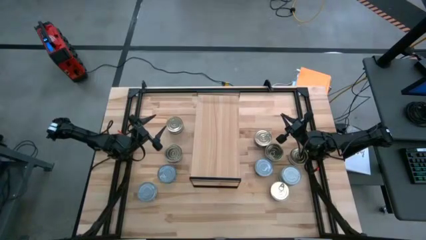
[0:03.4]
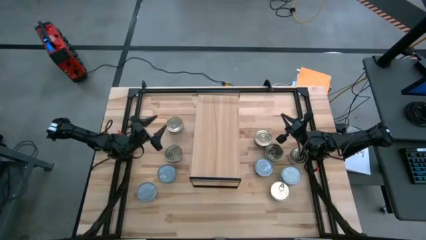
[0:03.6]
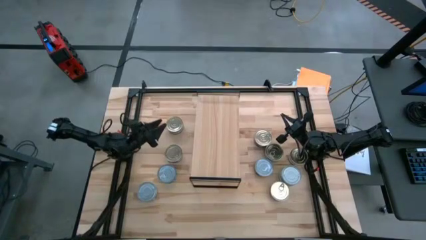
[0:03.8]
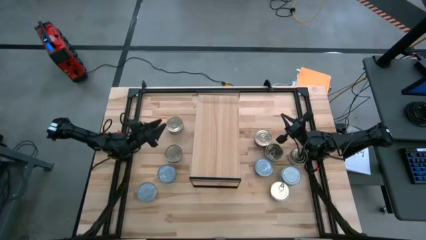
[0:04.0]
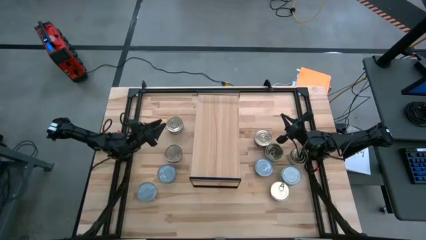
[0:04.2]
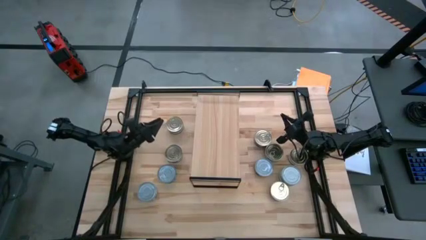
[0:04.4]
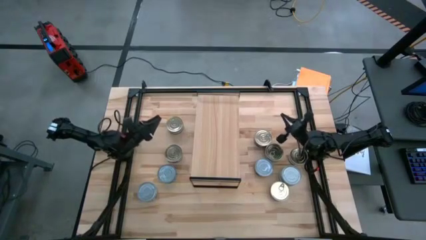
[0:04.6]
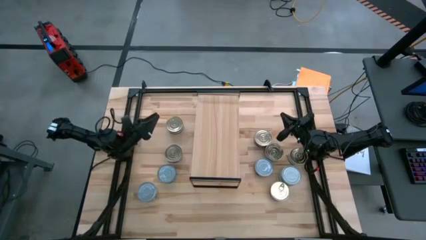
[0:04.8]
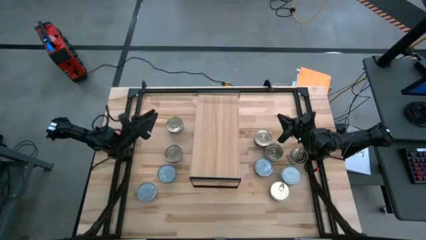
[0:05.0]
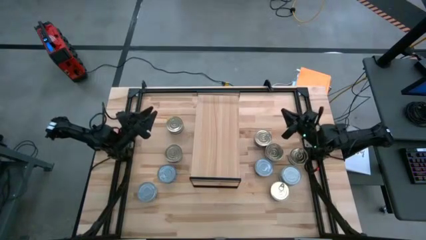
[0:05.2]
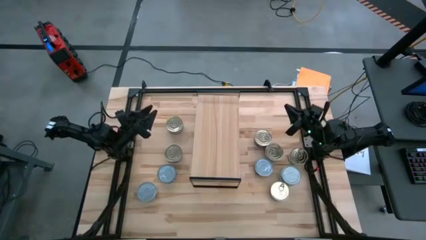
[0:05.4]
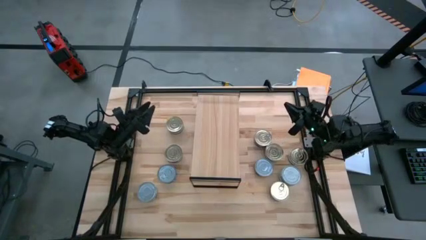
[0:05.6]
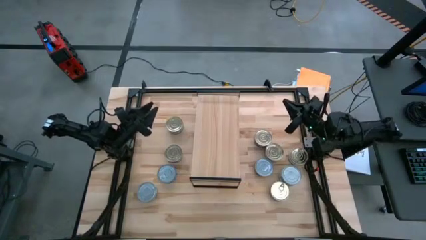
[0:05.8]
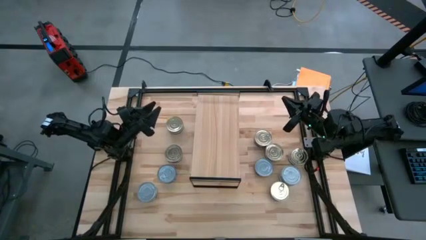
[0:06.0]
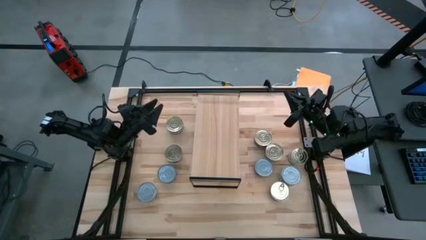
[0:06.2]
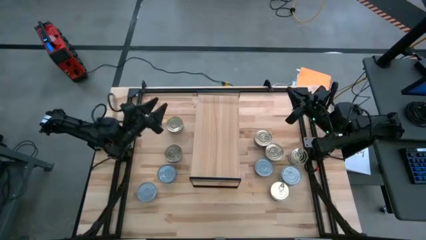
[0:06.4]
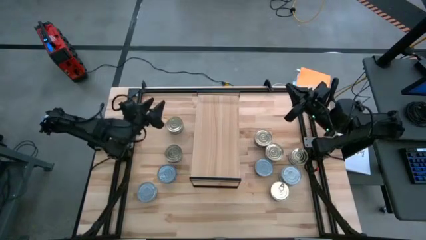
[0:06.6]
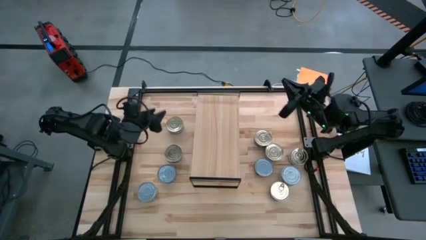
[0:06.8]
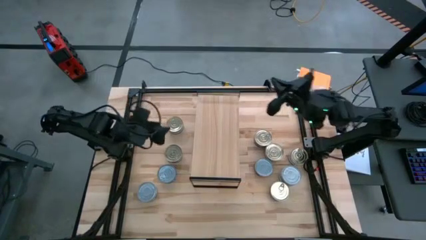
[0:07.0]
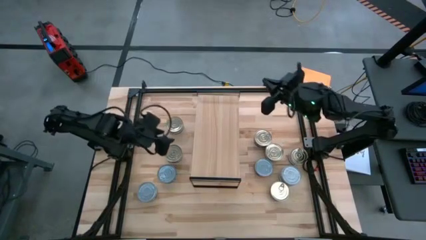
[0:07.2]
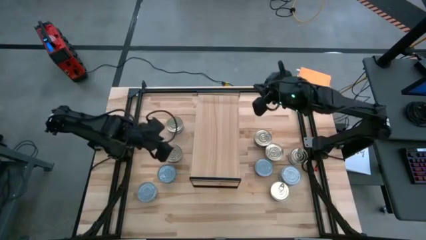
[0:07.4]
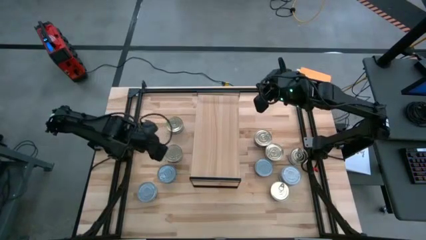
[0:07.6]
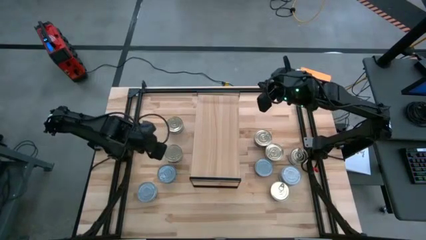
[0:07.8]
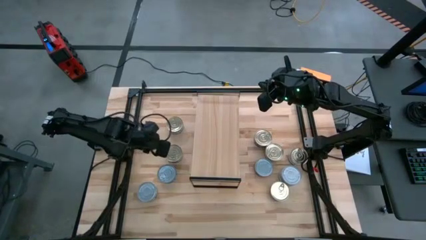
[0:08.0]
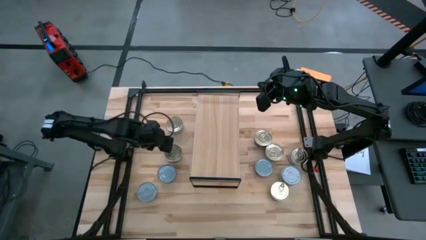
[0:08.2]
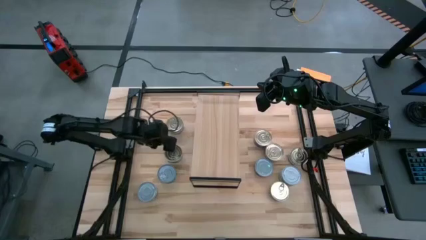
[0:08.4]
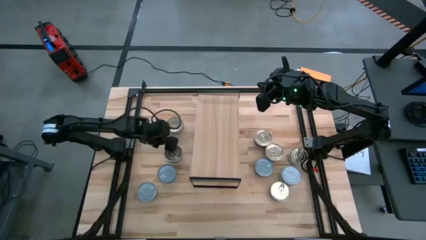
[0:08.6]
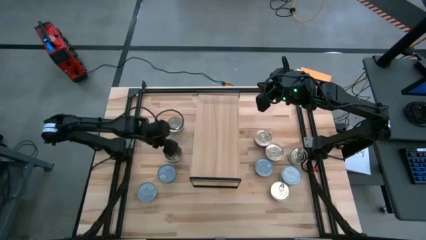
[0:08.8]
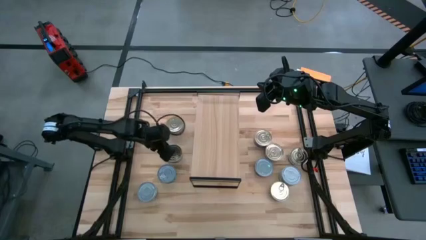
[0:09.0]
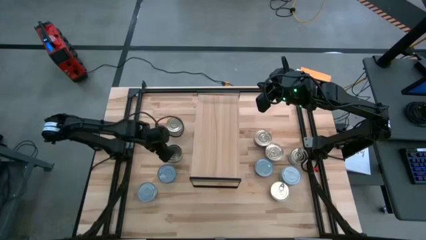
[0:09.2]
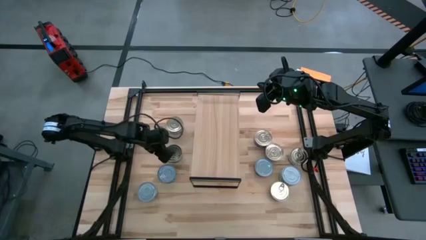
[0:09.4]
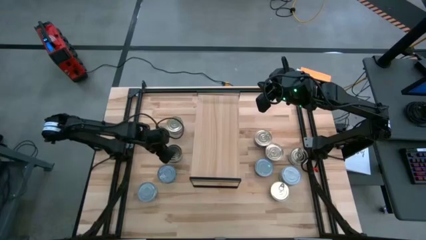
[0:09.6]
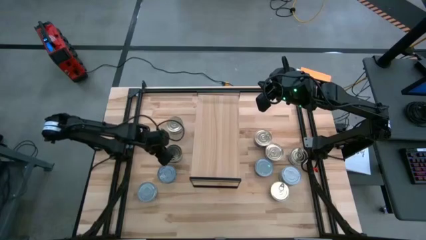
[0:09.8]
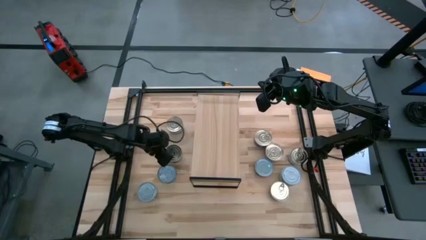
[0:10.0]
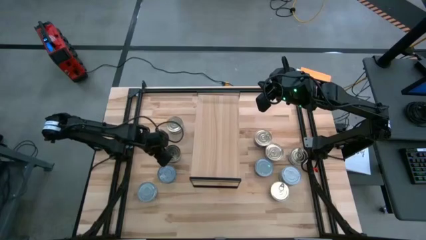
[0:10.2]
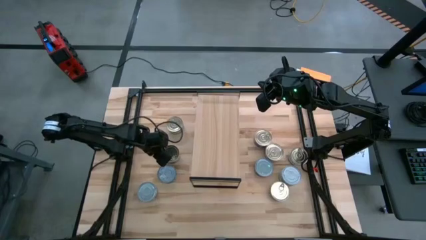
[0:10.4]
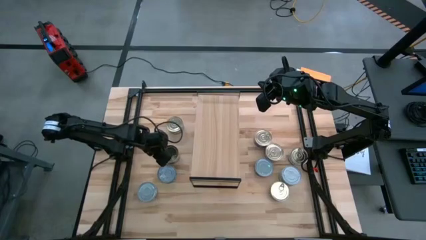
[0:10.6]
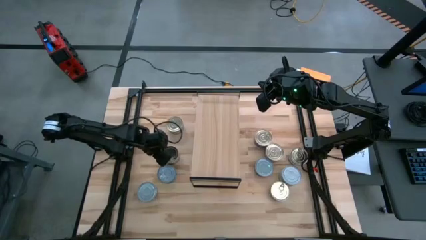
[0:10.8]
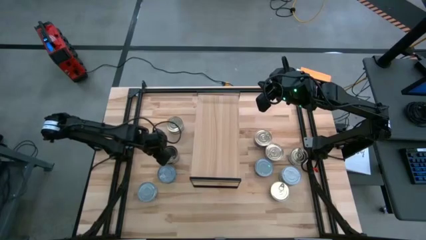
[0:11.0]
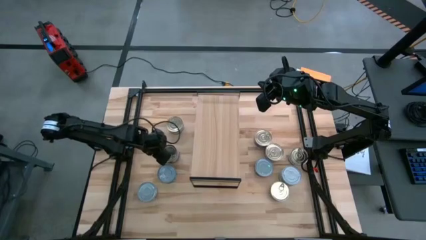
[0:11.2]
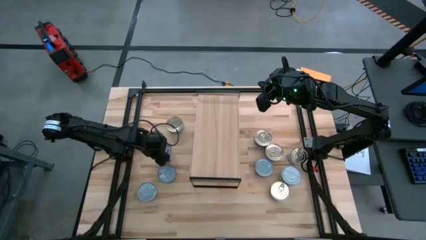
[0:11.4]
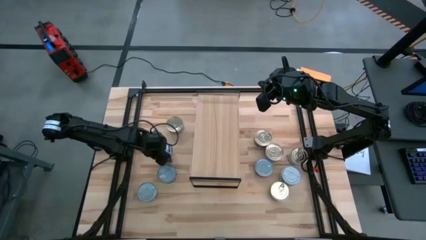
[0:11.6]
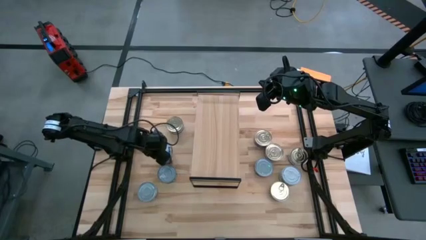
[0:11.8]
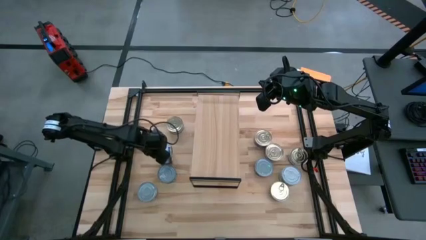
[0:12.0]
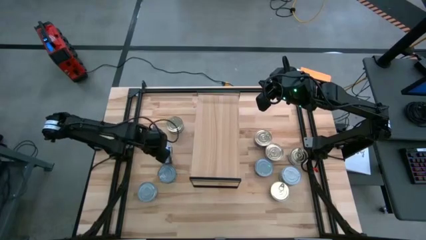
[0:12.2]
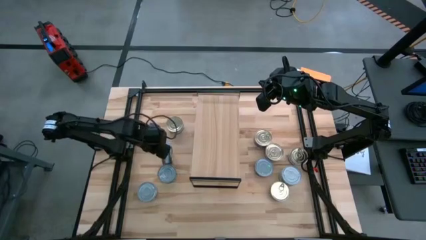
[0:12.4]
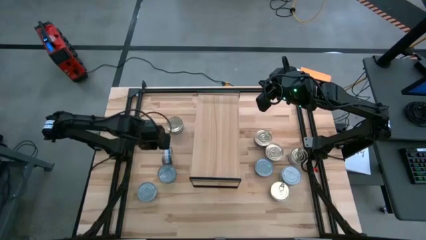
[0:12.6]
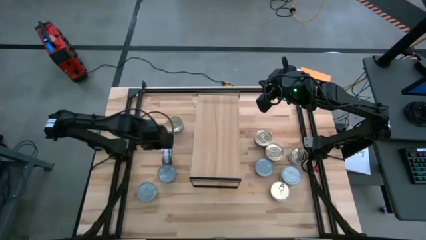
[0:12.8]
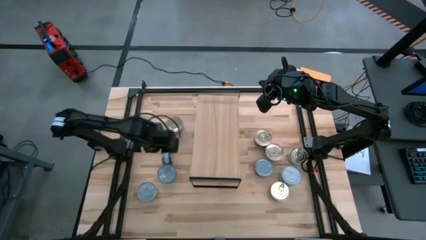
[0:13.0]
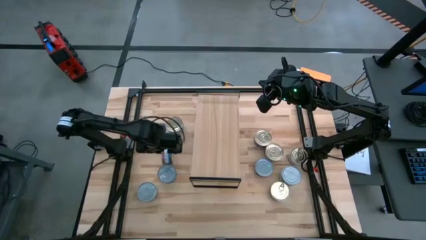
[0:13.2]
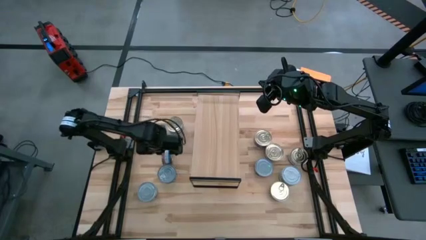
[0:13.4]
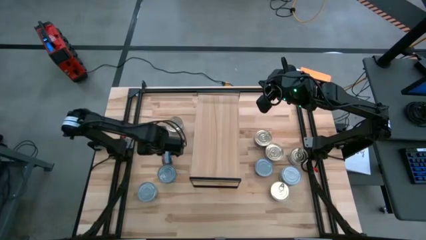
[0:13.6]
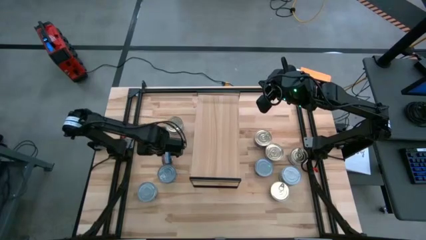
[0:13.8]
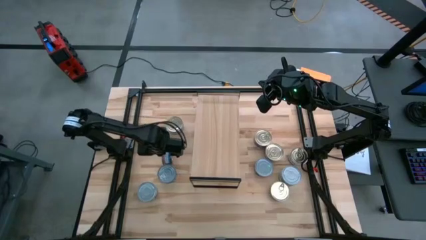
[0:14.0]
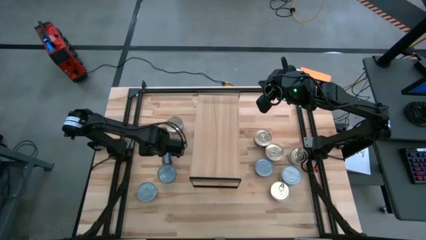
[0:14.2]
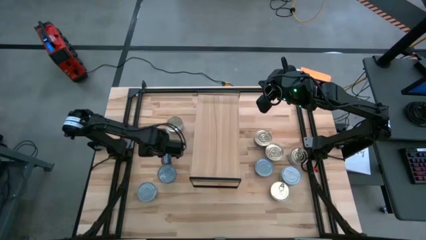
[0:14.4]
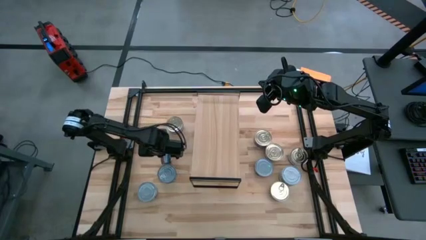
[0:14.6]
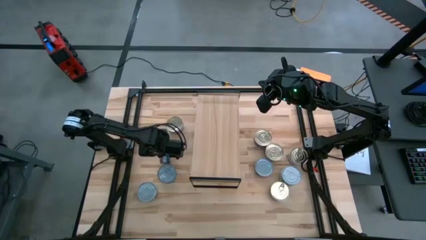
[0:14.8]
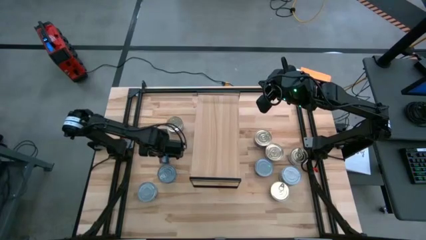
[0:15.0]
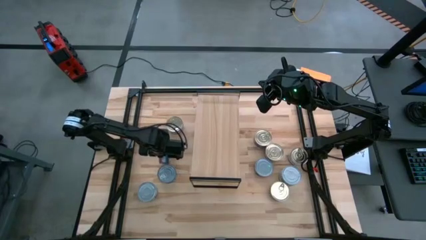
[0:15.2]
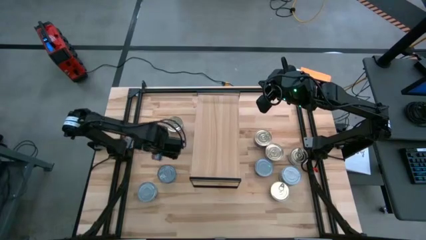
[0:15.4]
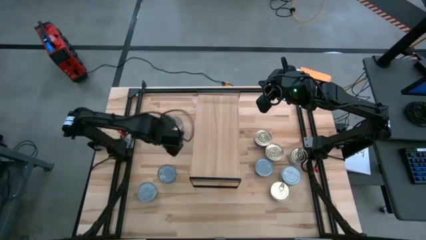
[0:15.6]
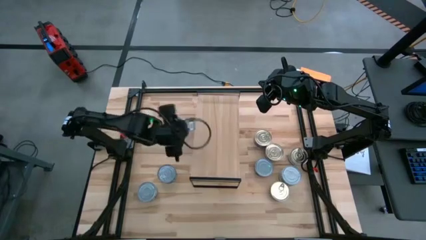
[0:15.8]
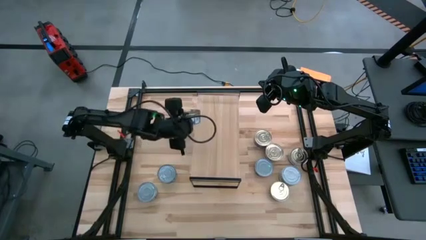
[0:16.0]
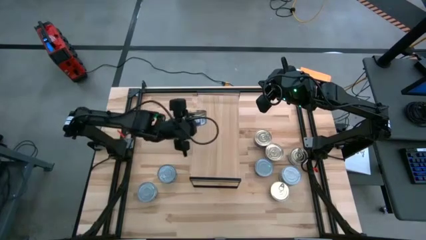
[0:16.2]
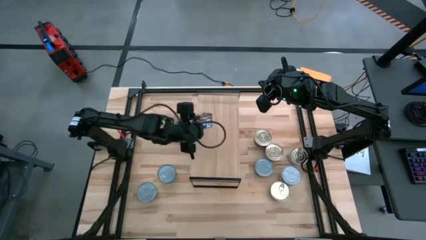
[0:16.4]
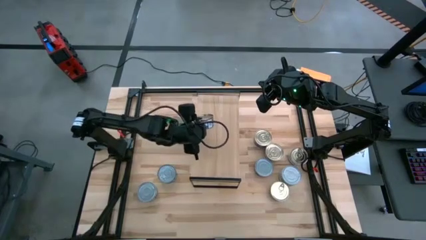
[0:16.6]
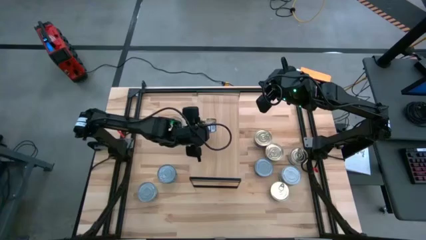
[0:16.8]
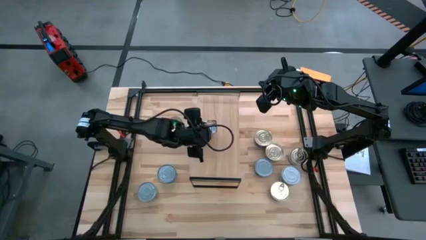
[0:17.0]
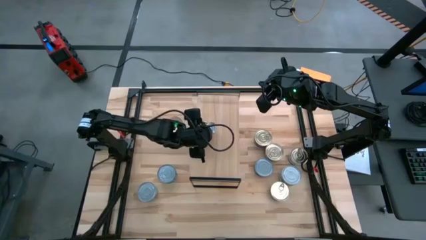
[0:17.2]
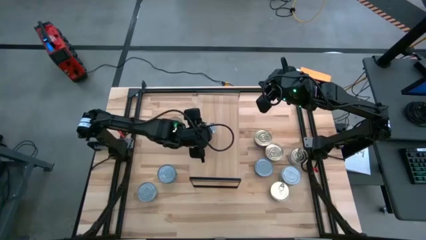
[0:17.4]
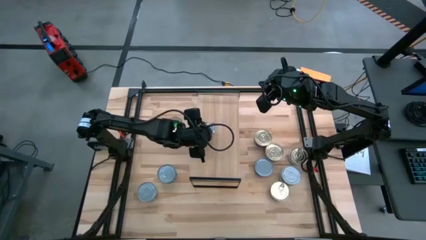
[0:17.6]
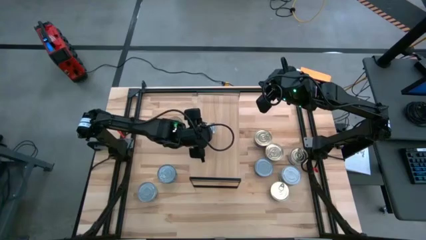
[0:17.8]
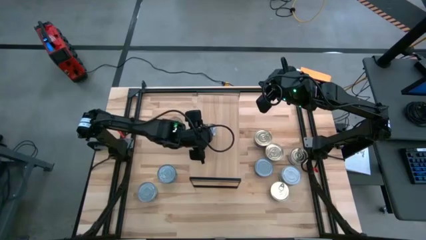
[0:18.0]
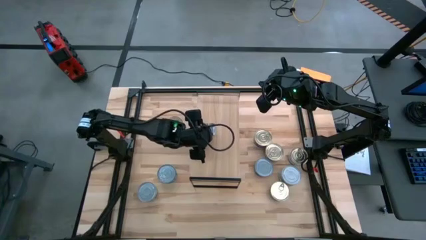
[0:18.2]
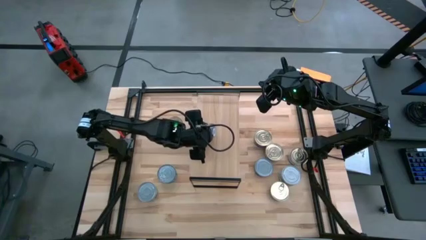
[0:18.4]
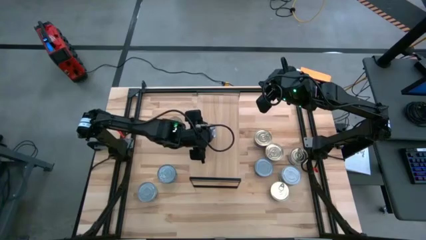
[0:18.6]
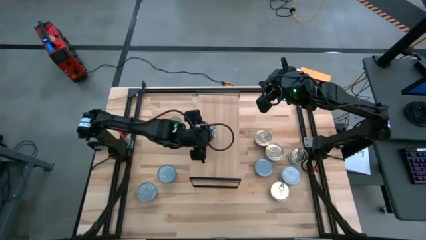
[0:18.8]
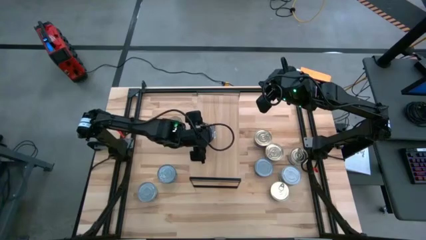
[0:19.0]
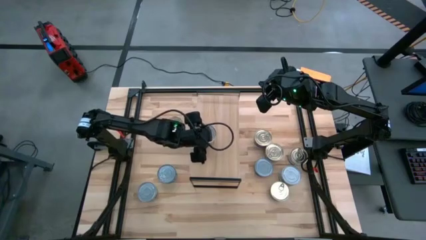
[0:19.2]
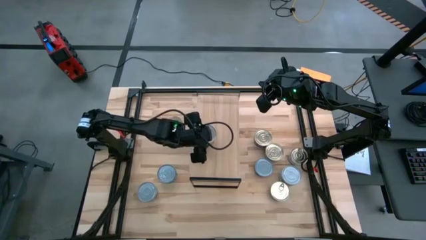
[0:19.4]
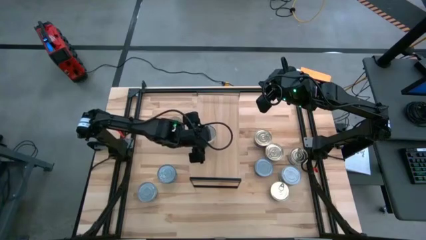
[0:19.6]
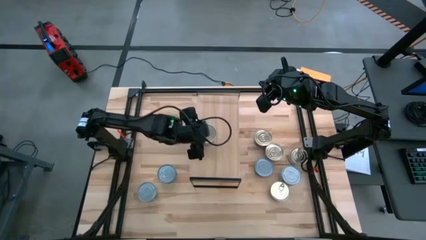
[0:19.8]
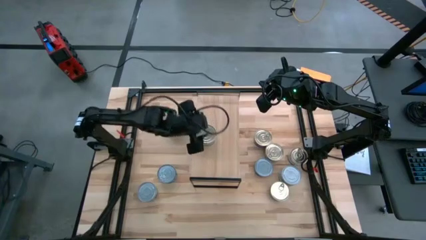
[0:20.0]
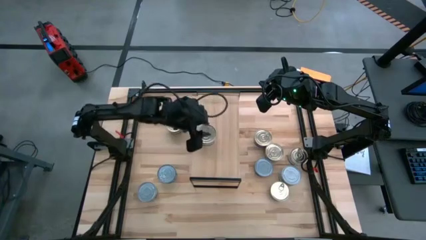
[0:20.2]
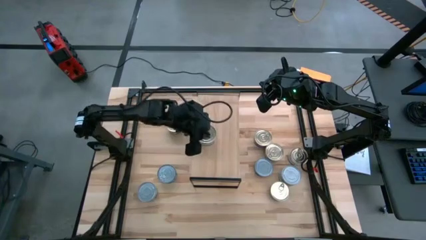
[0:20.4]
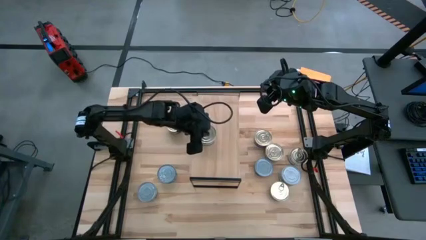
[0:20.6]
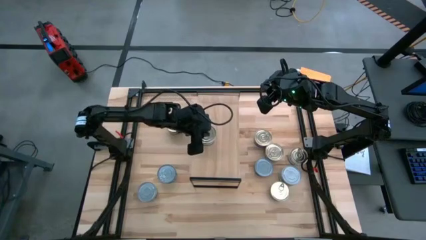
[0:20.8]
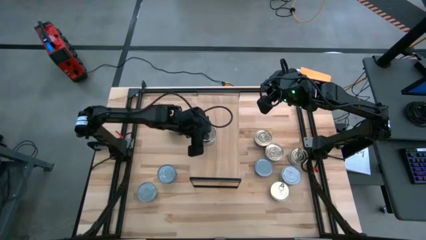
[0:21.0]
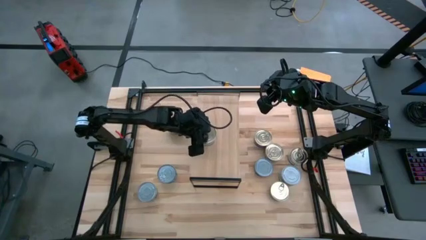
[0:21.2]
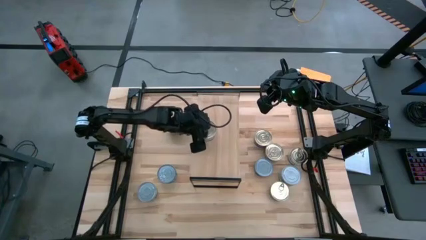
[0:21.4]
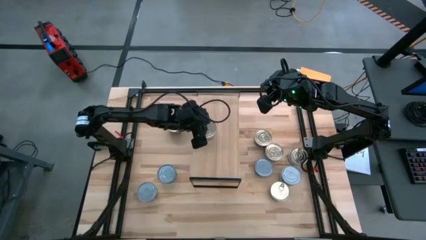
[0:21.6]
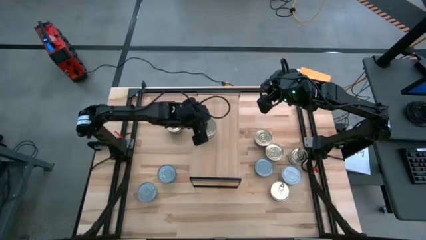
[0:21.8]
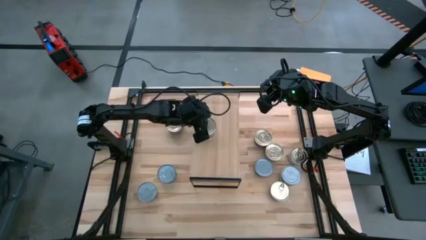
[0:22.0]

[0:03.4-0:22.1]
Task: Stack canned seafood by type on shelf
Put the blue-pink tuna can on the shelf
